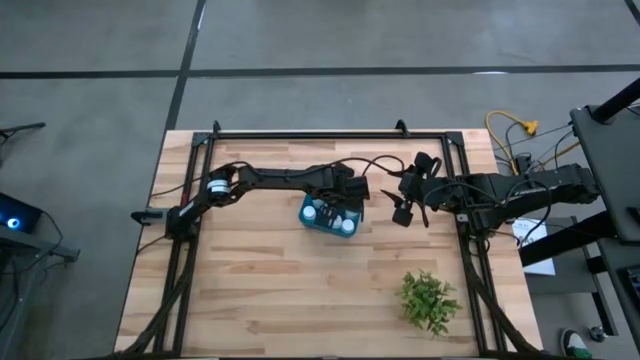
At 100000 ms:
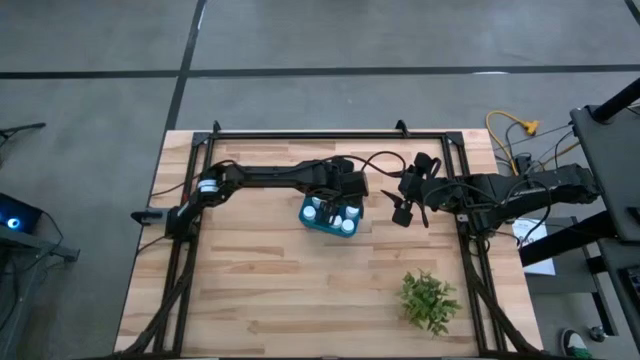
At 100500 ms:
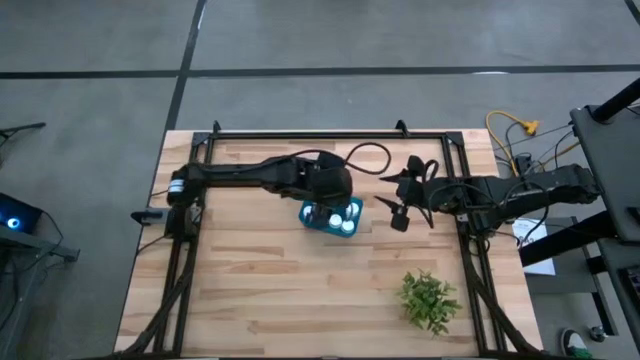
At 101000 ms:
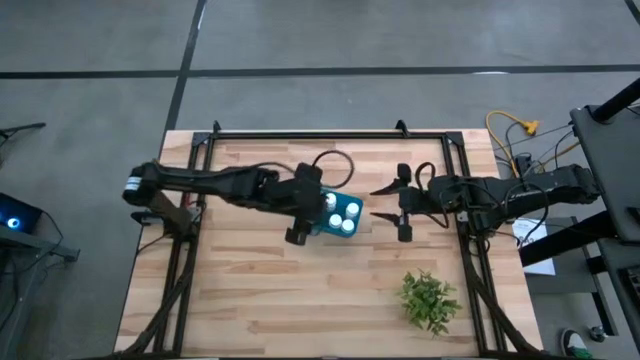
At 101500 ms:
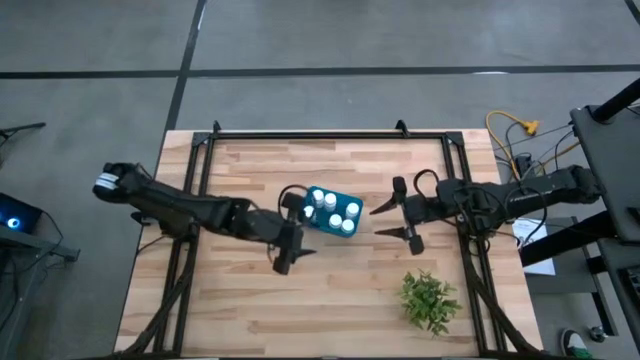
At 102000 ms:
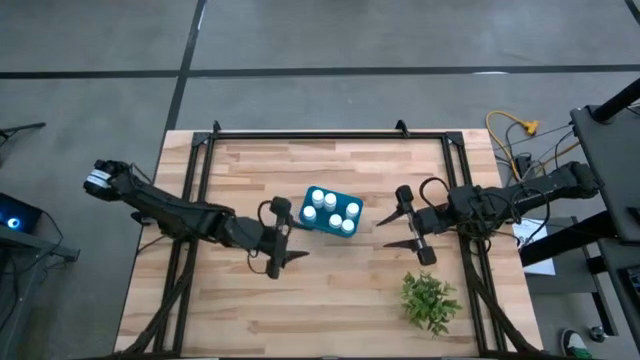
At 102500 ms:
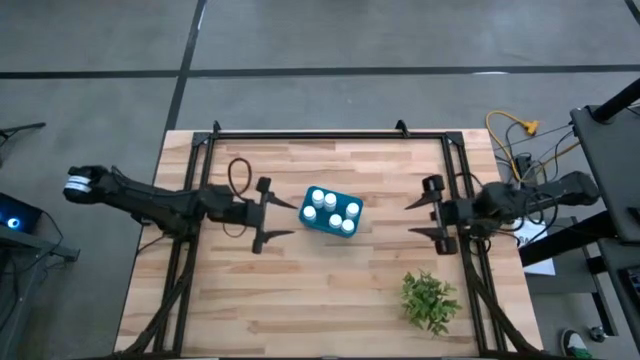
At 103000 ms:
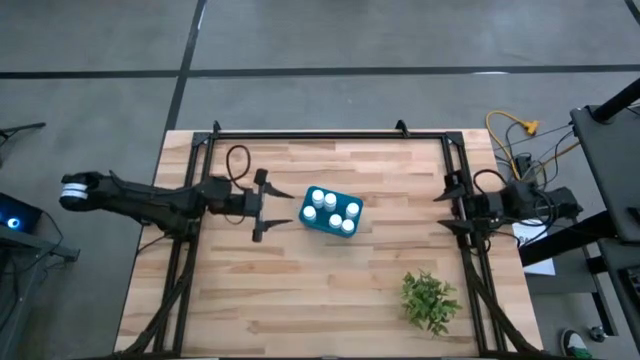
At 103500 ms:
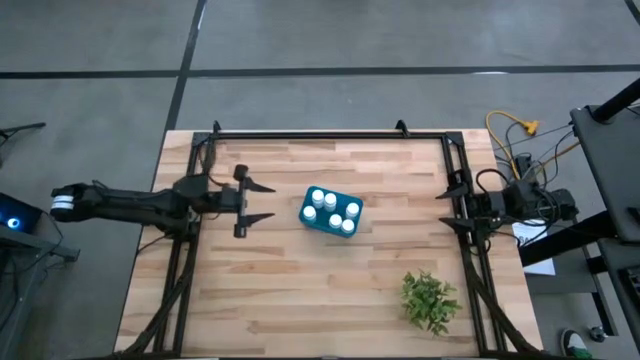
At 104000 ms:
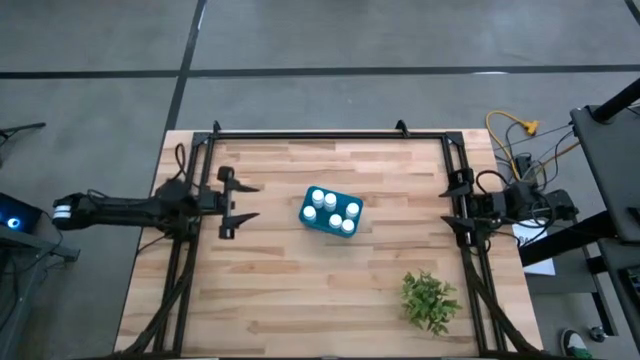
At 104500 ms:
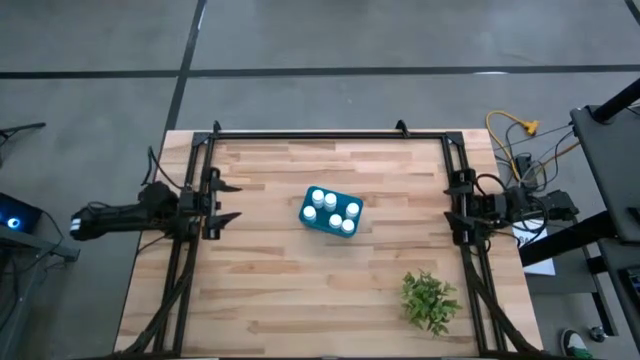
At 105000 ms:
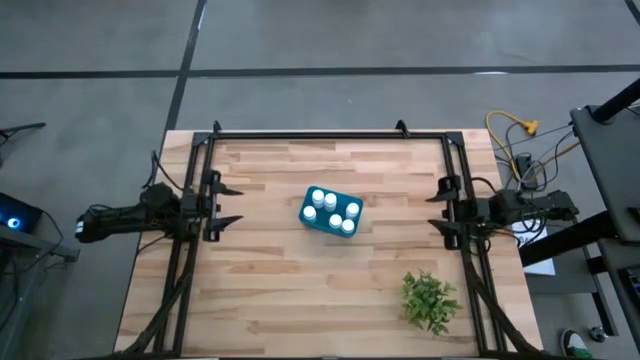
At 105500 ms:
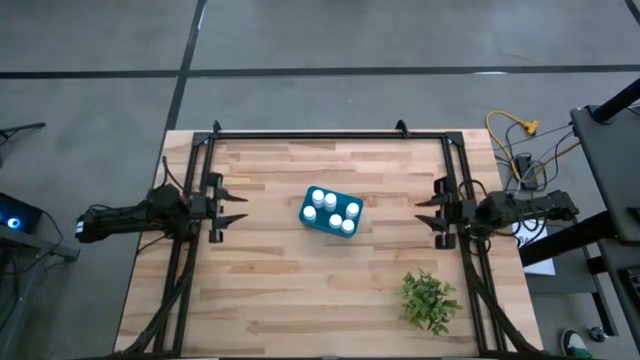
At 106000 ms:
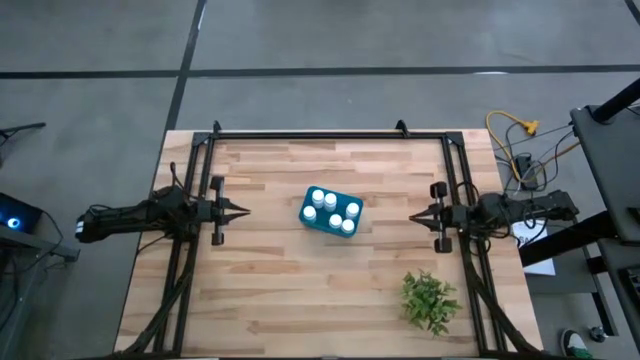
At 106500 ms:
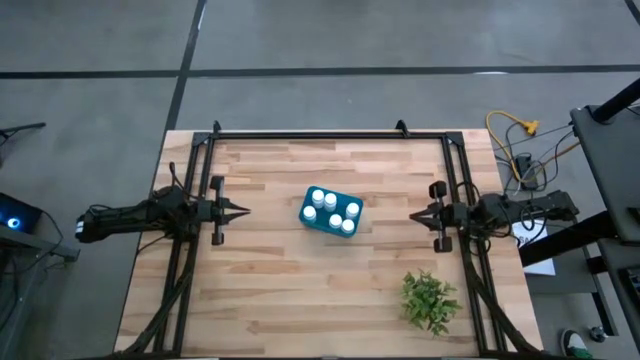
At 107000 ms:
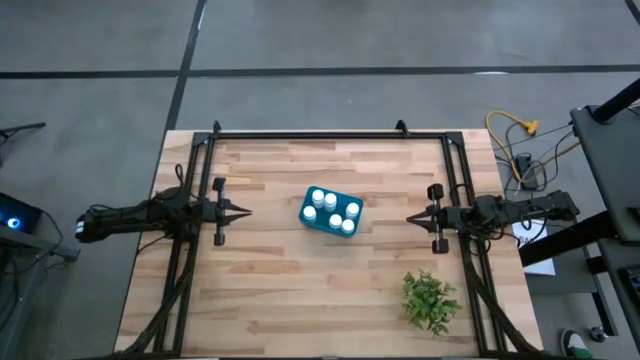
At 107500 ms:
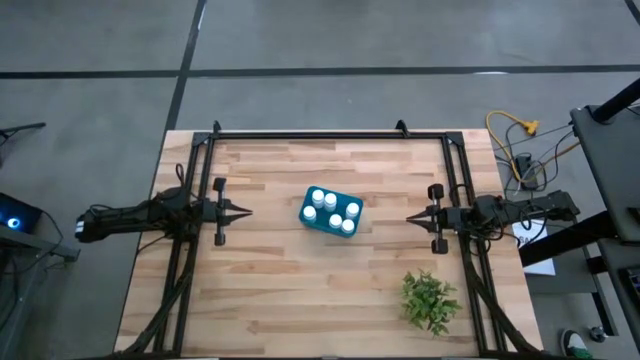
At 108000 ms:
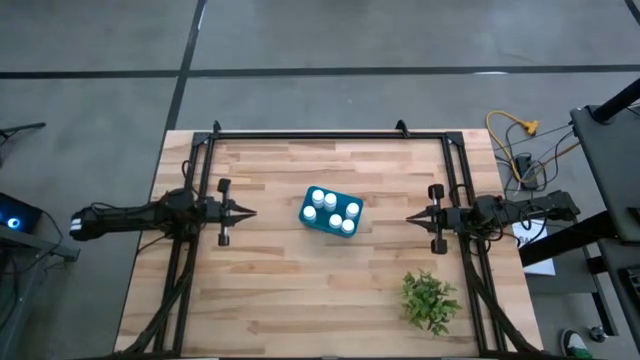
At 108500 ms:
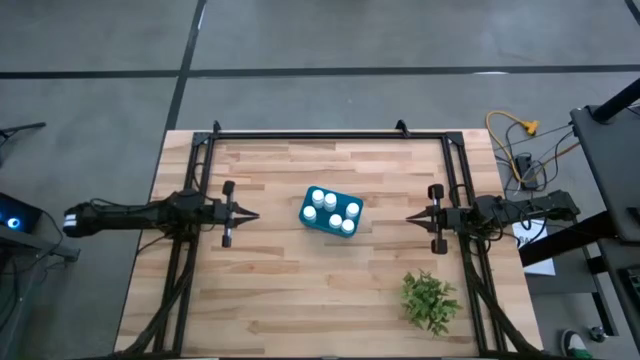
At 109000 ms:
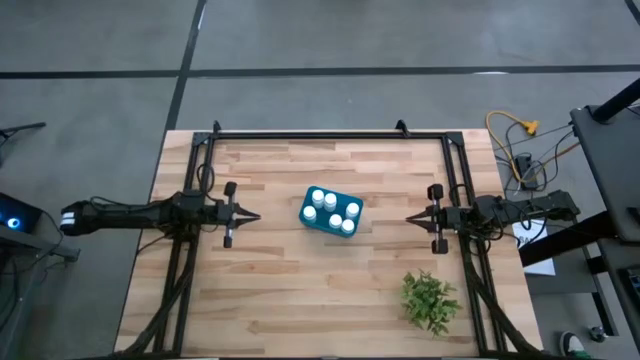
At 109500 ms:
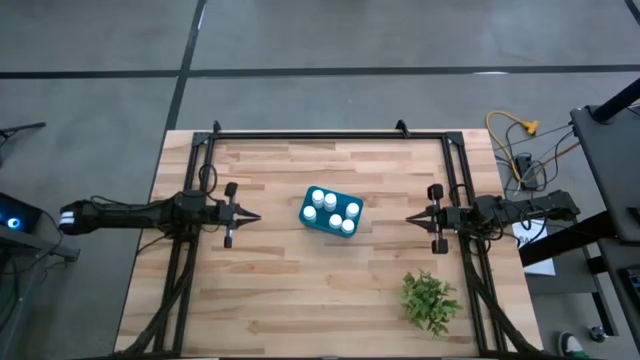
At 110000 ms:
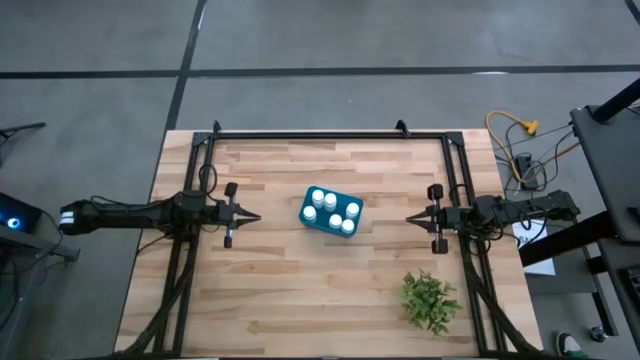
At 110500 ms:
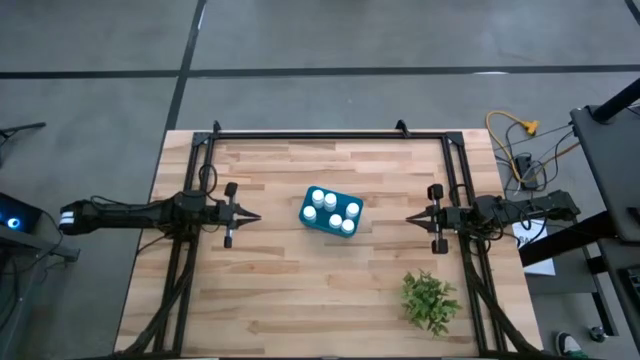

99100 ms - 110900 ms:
Task: Pick and place pill bottles into a basket
Return to Home Position

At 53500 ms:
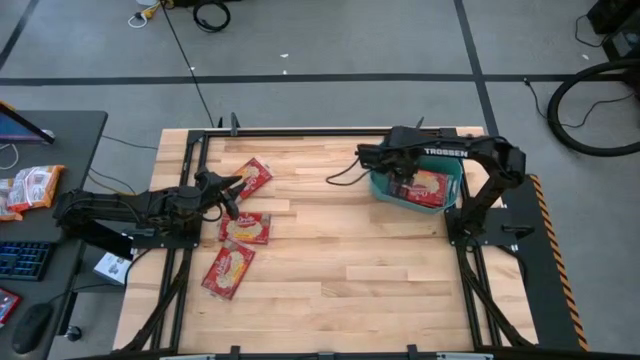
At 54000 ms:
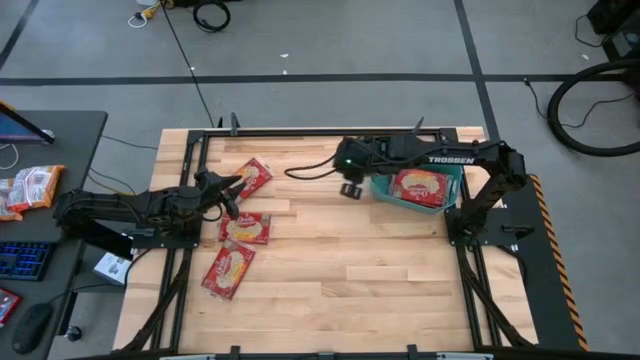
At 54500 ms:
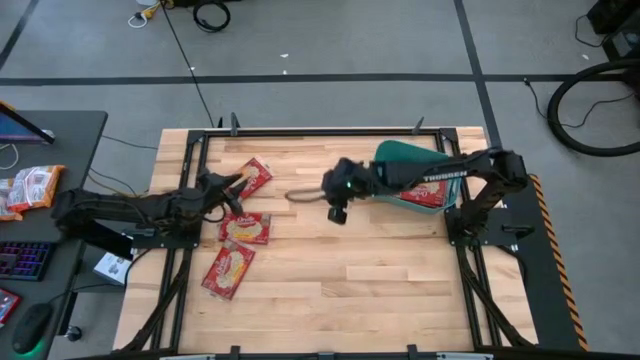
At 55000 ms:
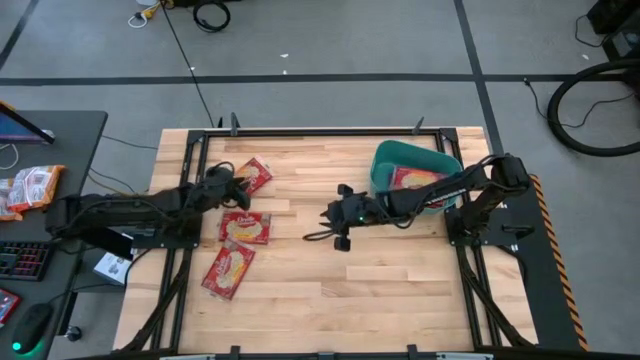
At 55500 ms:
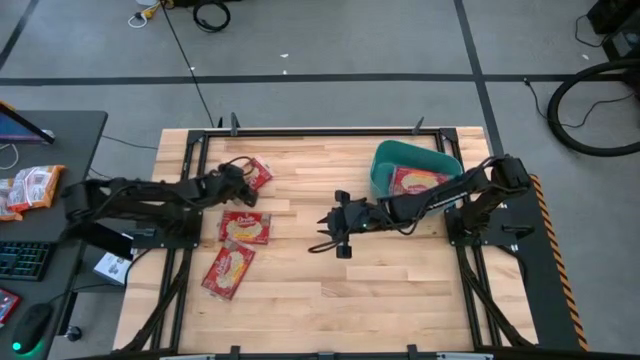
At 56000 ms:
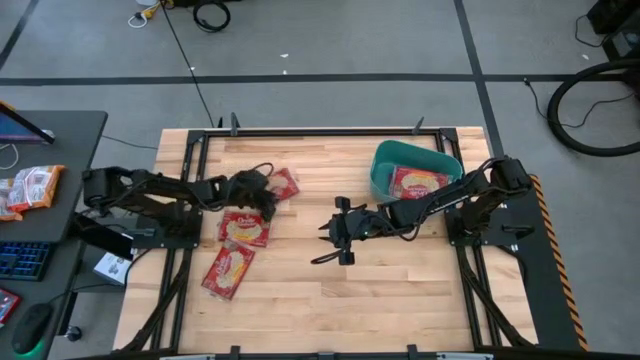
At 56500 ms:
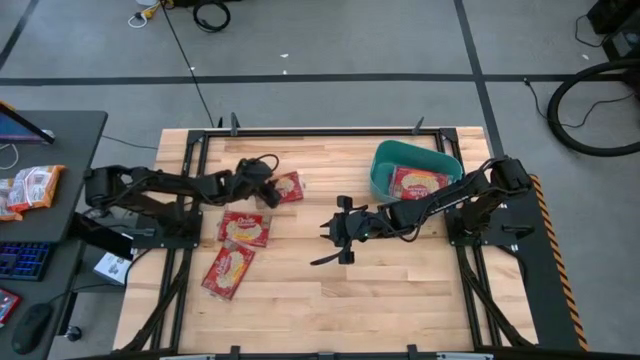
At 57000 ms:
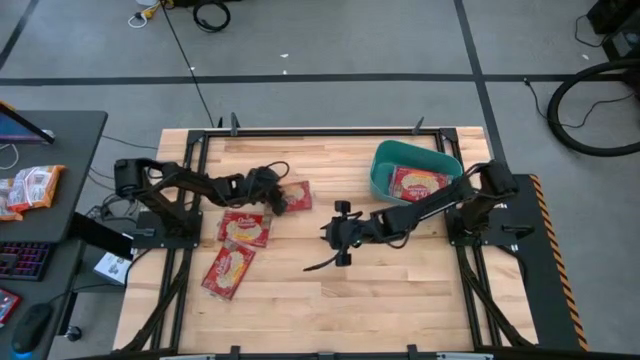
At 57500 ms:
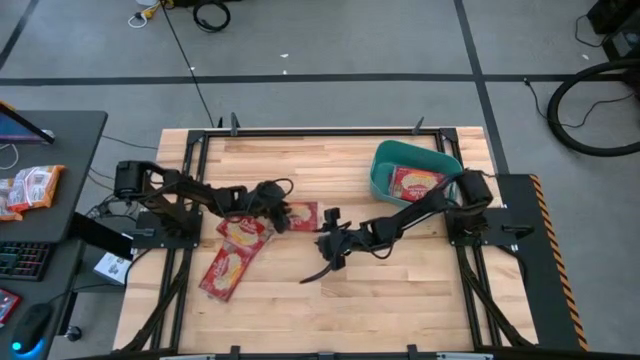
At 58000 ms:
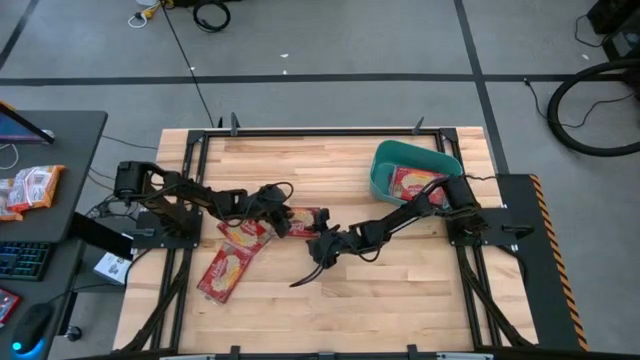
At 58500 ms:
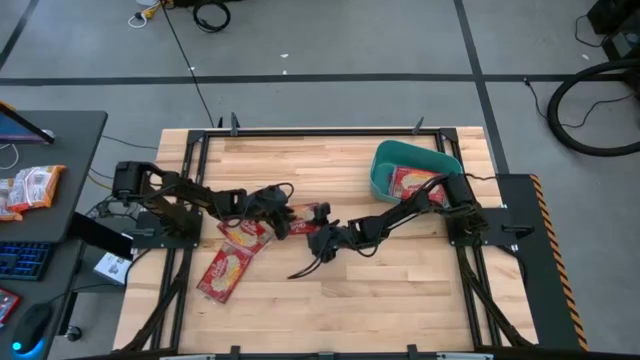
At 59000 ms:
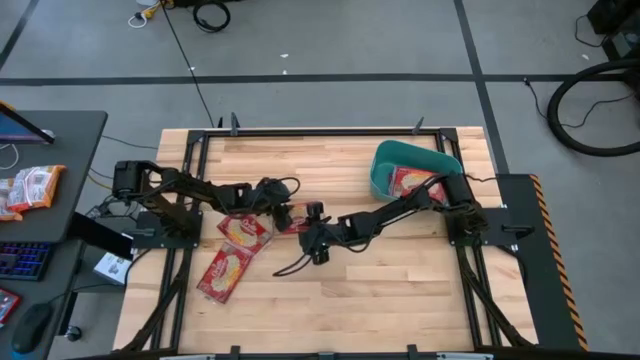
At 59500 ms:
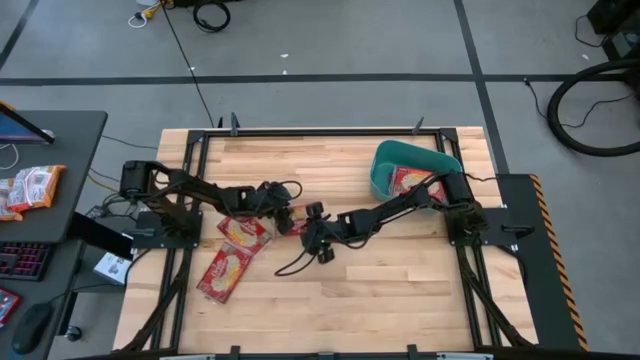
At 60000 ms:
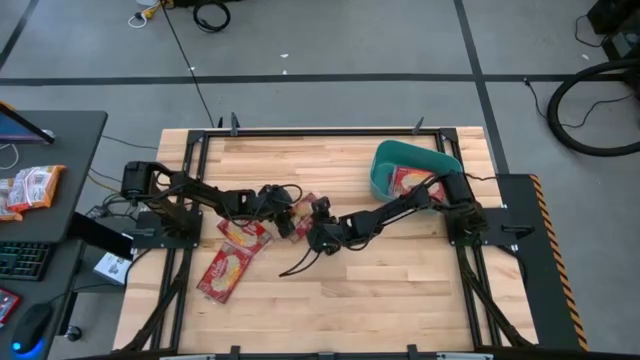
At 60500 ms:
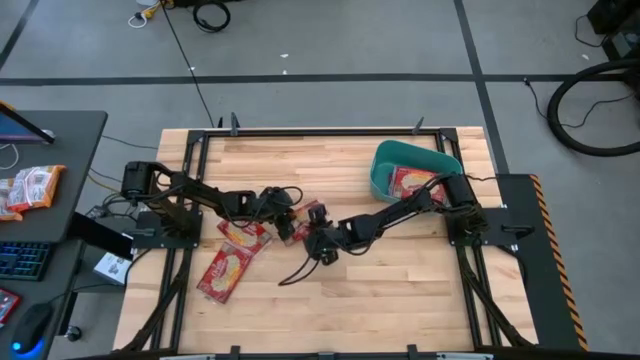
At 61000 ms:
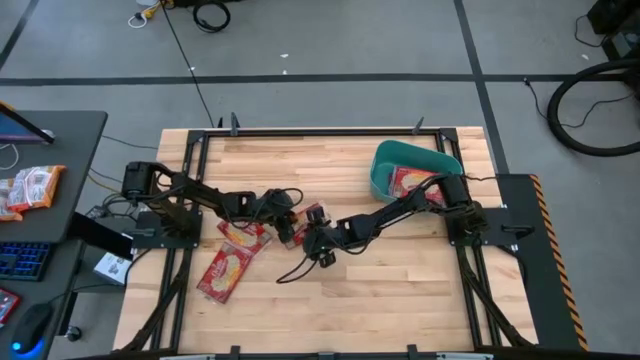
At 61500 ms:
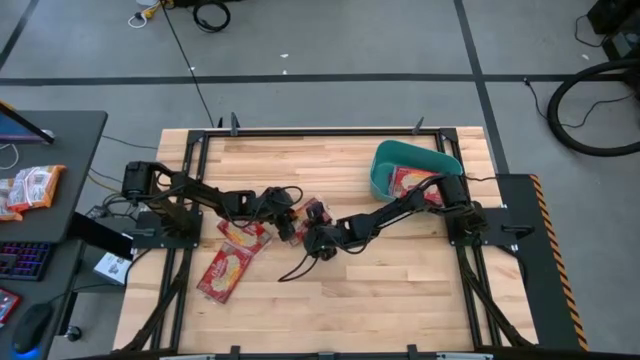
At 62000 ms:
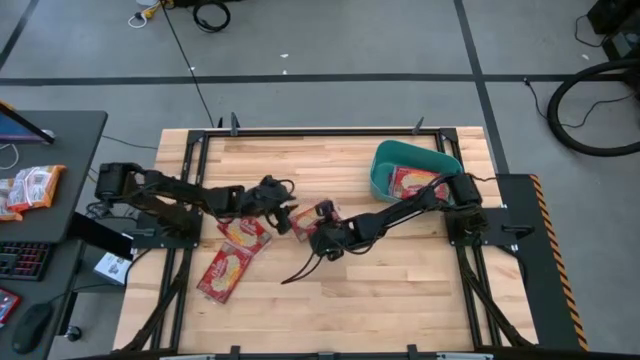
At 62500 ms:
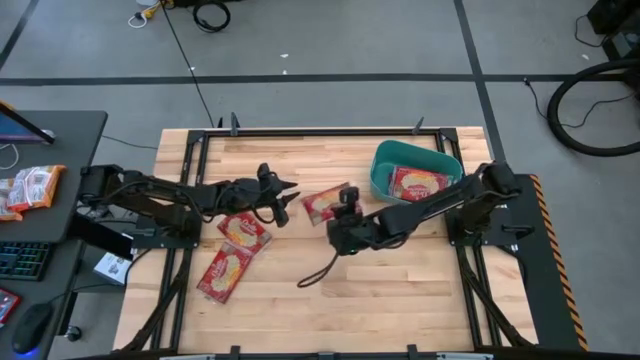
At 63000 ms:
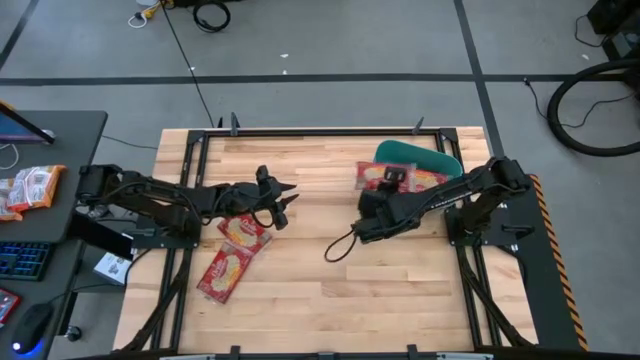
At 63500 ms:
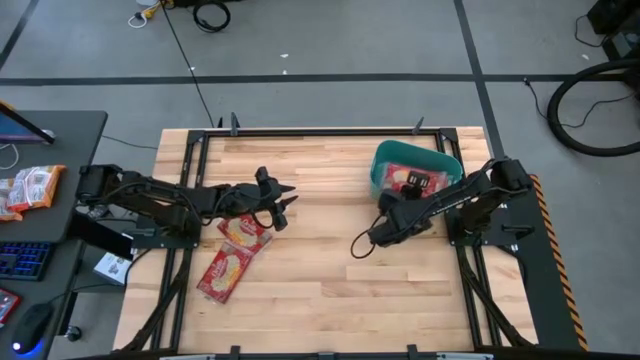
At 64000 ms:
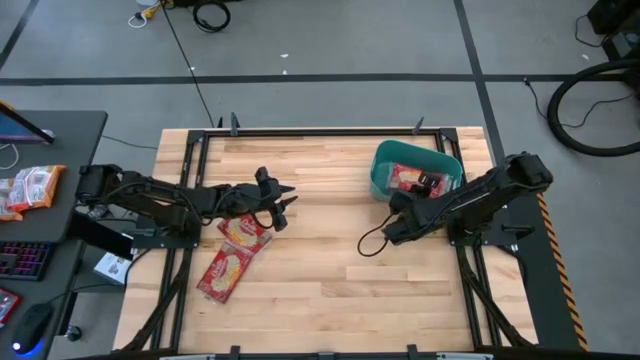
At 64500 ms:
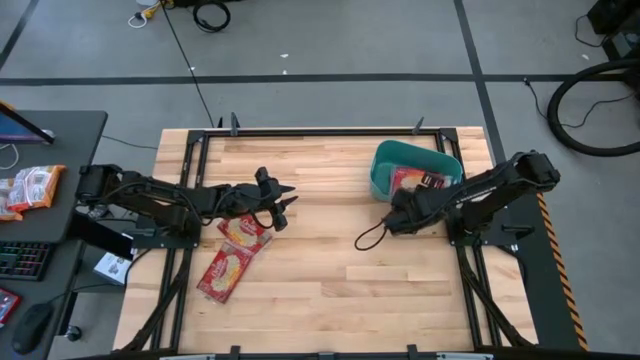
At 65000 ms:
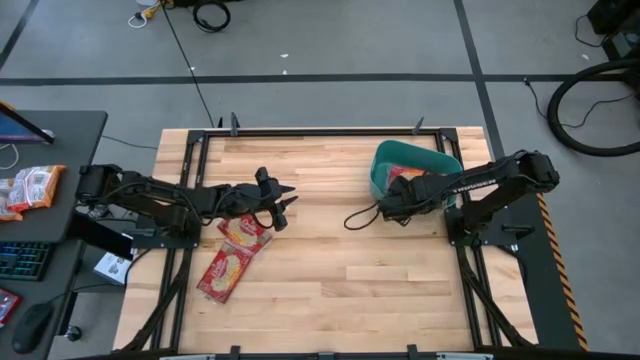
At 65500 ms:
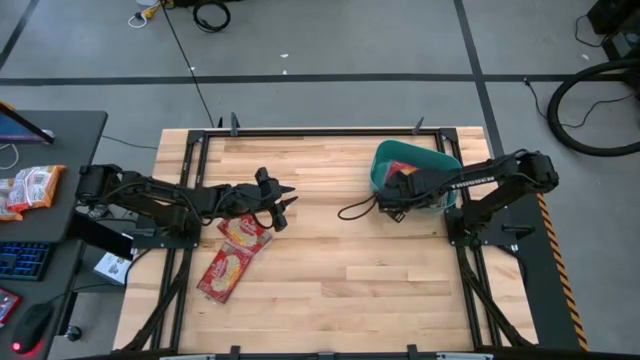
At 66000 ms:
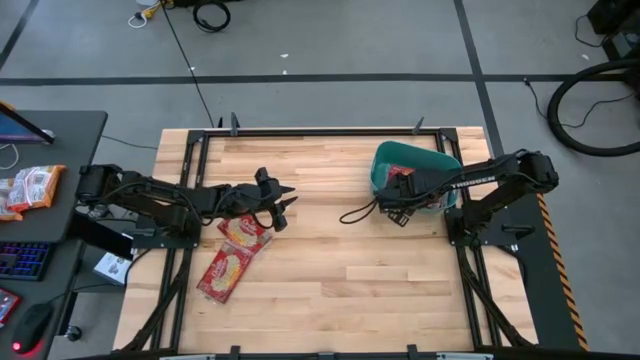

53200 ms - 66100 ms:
Task: Sort popcorn bags into baskets
Put the red popcorn bag into the green container
